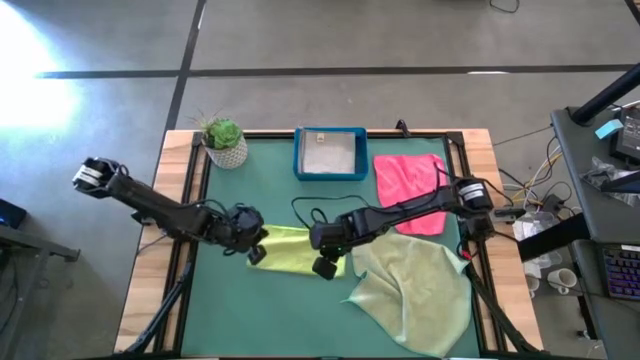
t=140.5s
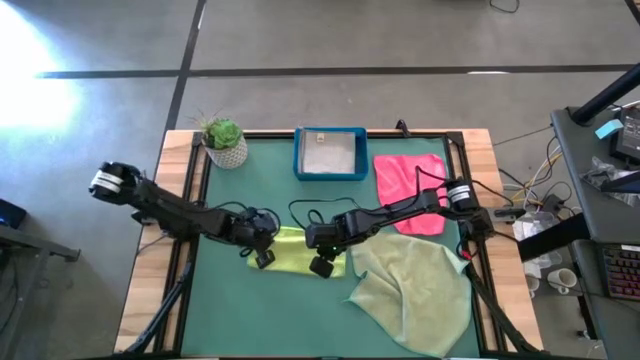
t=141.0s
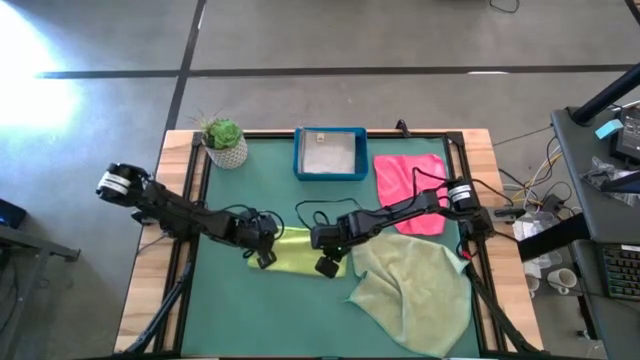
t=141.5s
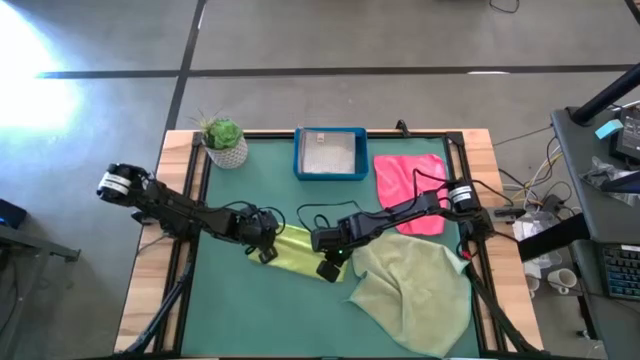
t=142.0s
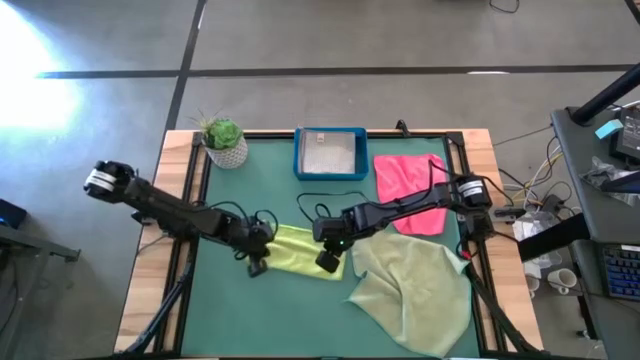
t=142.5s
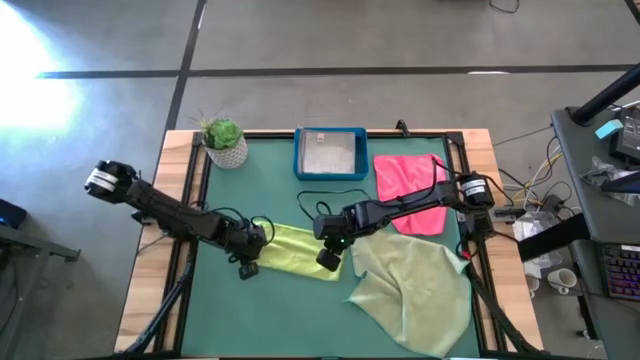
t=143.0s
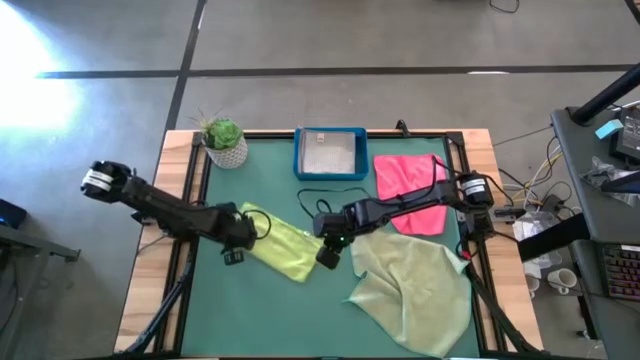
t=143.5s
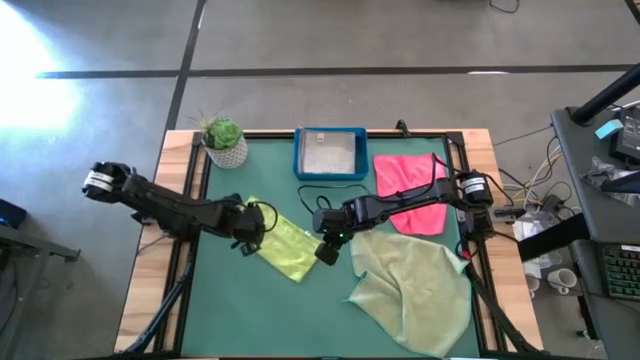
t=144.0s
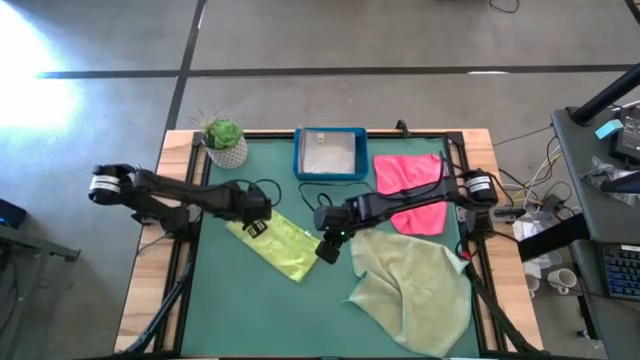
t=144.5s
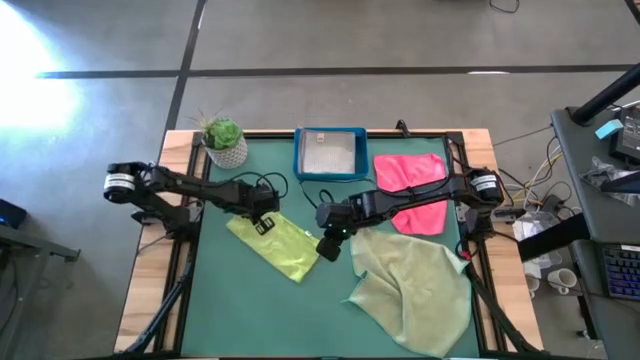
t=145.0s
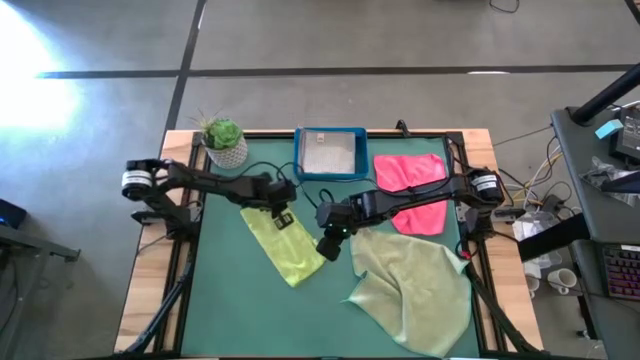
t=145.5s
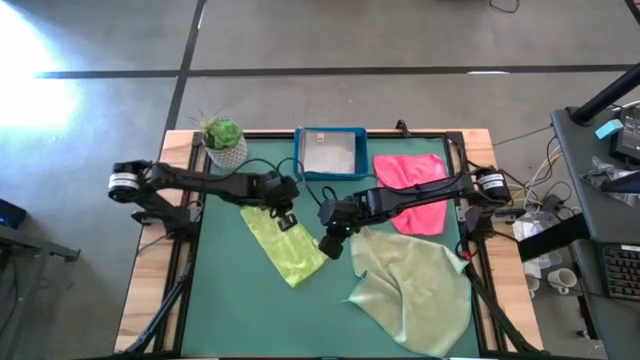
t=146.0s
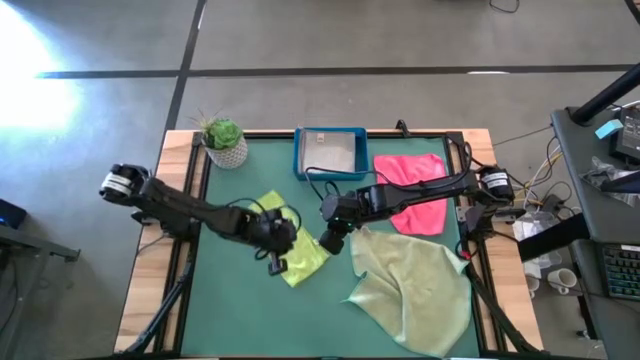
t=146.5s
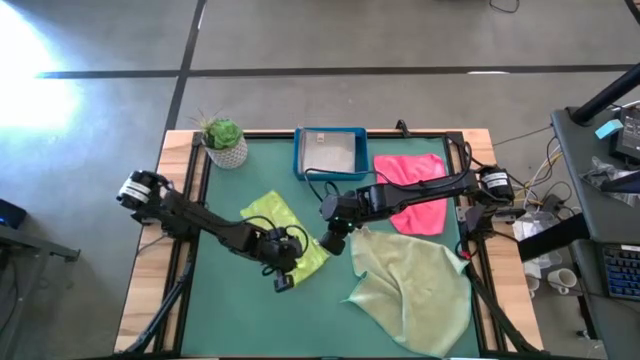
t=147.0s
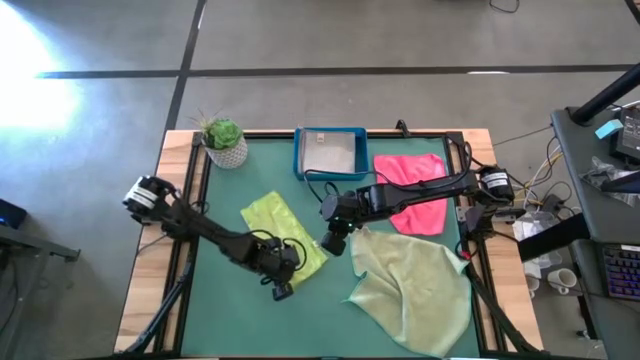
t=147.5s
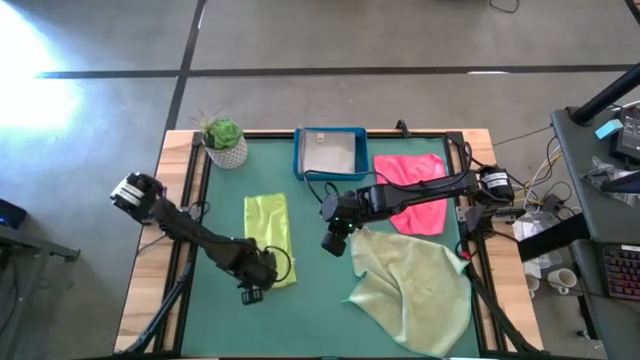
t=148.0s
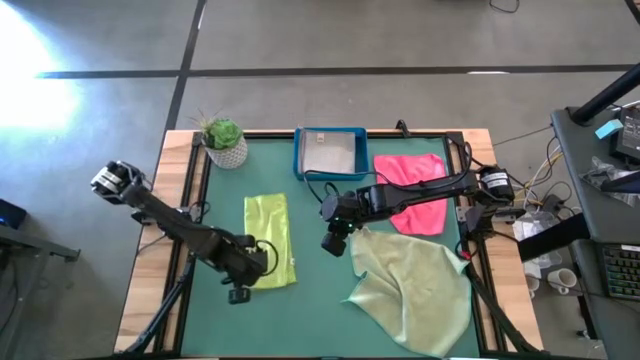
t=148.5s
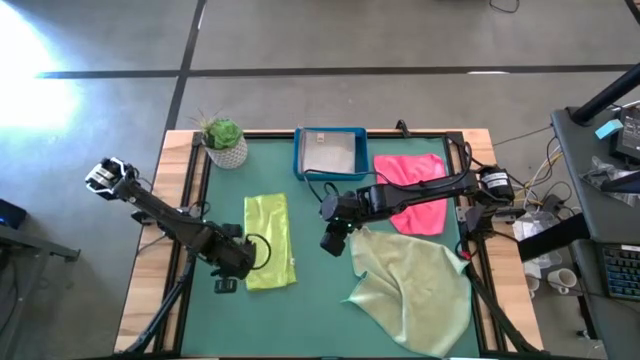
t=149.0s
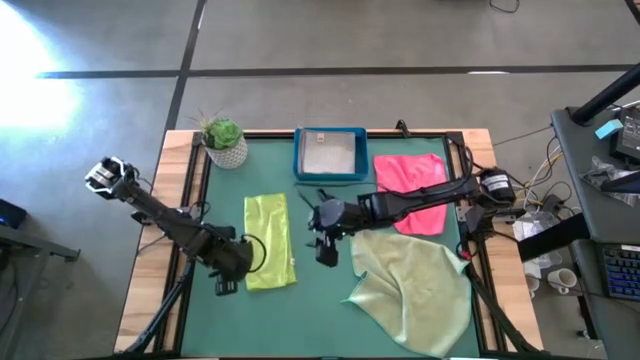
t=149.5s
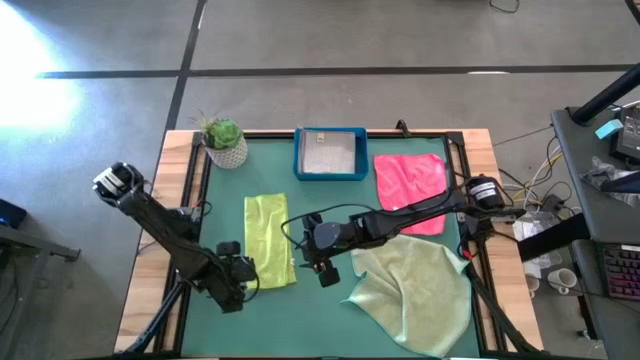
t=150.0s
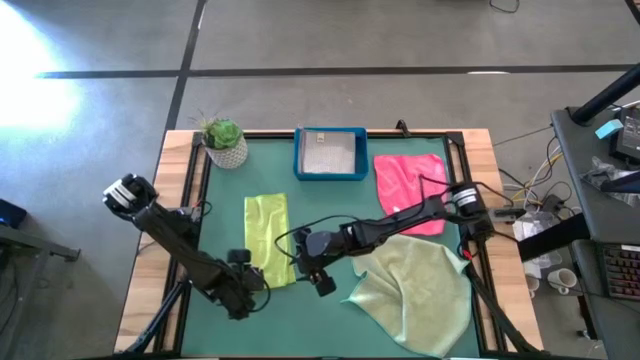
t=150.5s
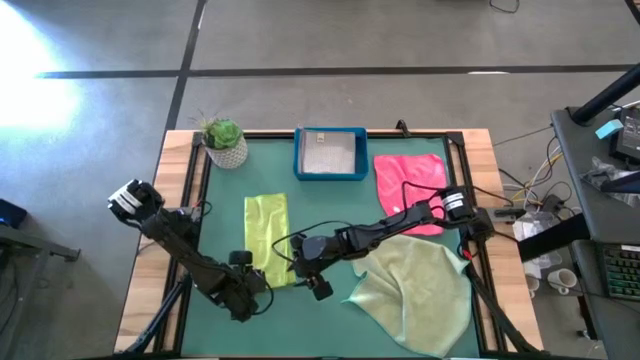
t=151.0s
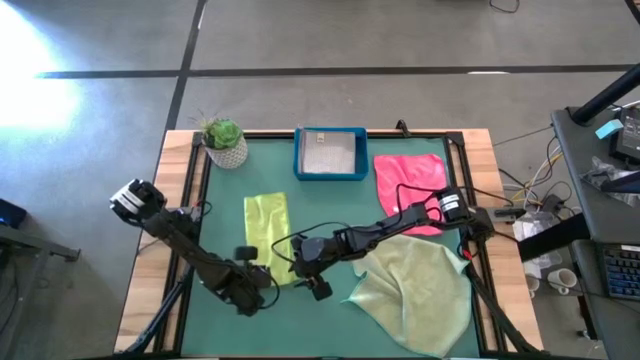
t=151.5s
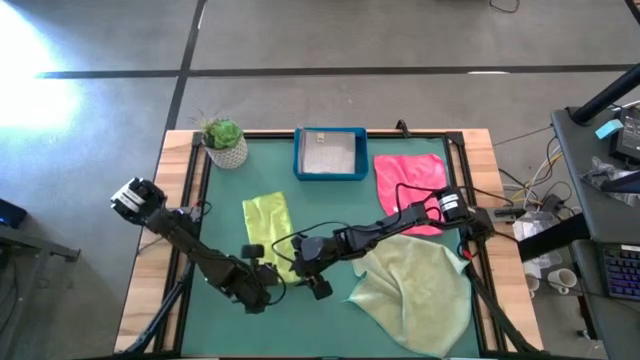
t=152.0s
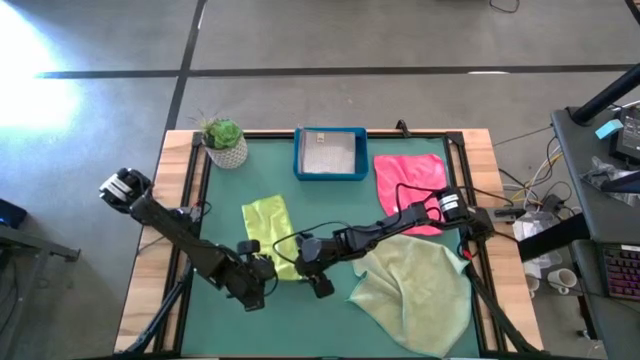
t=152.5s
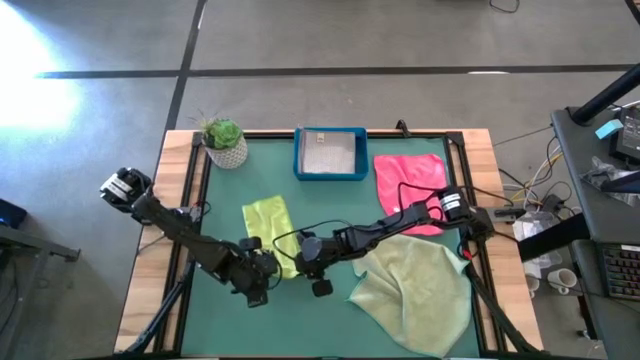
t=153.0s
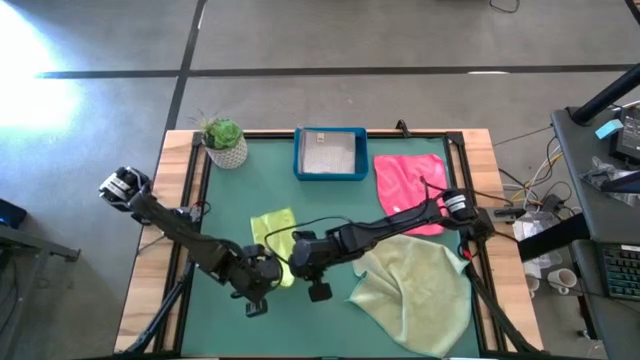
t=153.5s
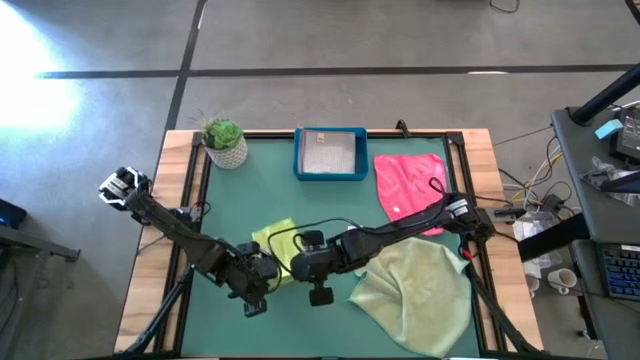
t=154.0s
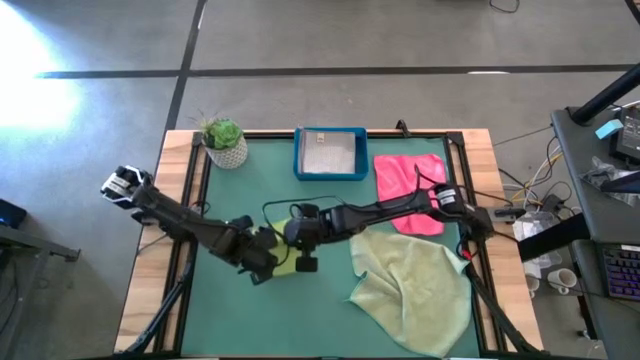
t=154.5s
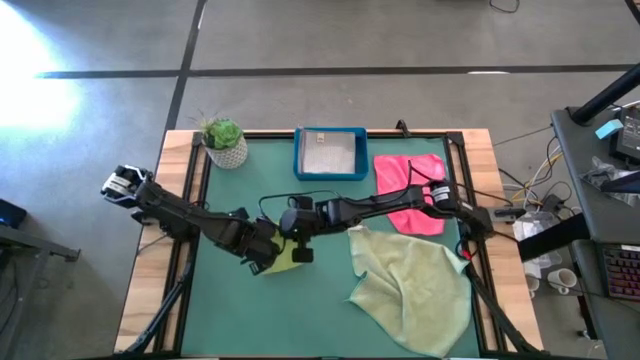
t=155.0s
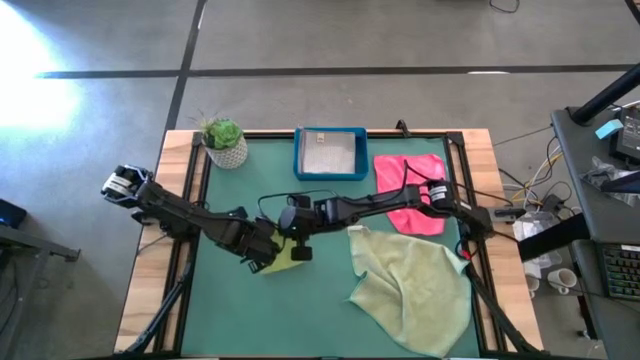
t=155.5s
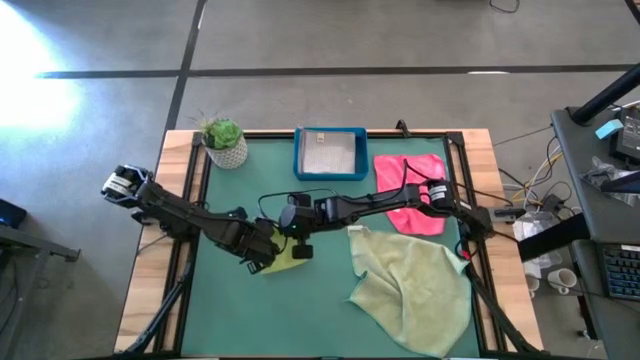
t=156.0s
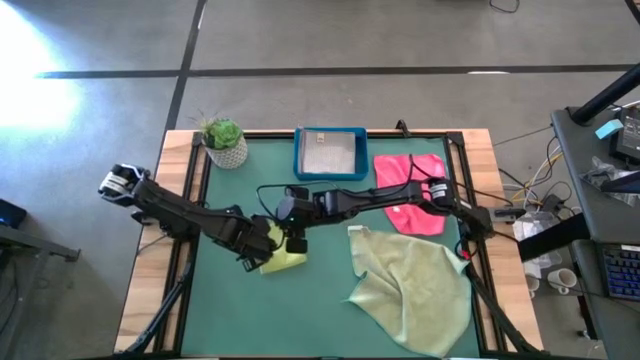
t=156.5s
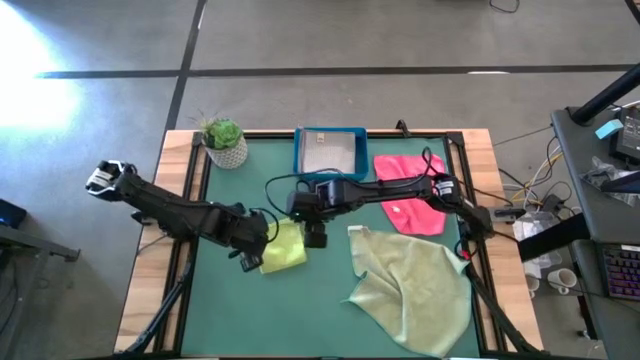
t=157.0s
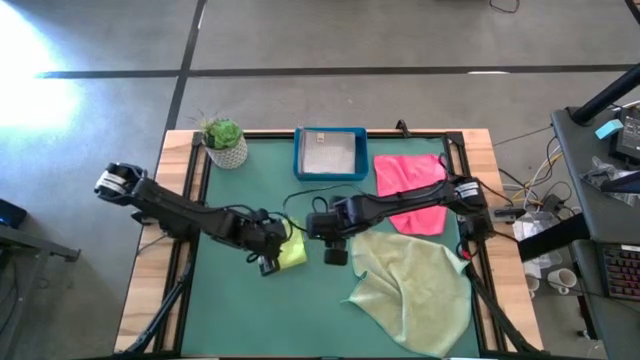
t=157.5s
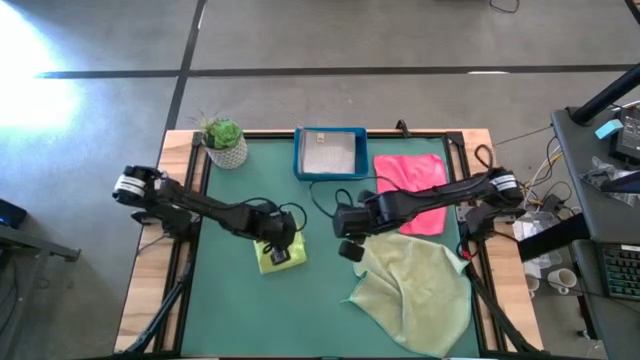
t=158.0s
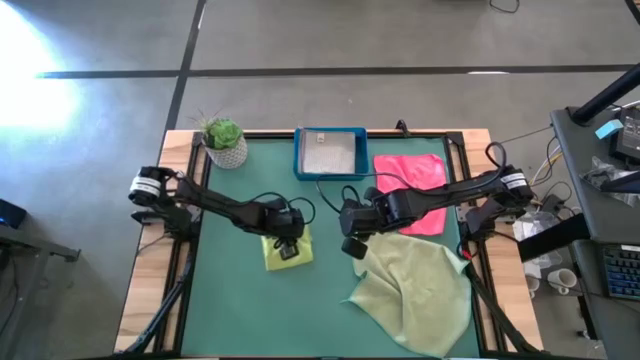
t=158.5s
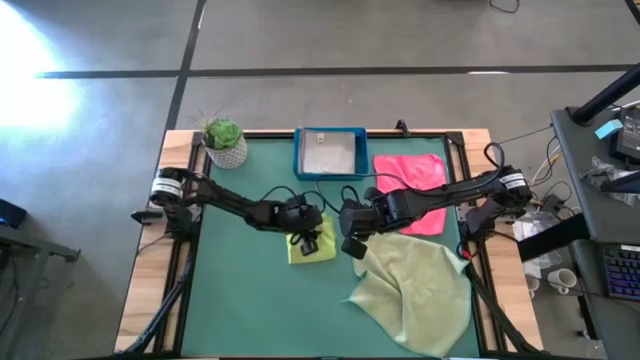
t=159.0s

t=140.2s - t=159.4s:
Task: Fold microfiber towels
Fold the green microfiber cloth

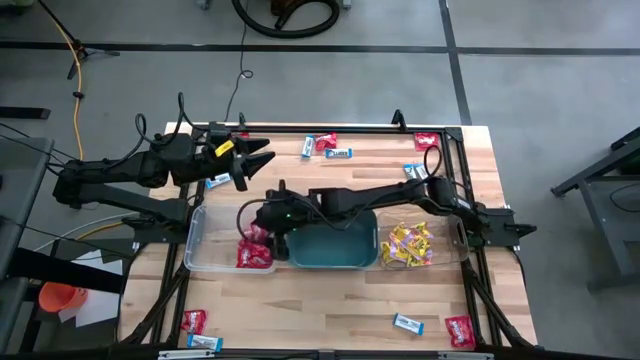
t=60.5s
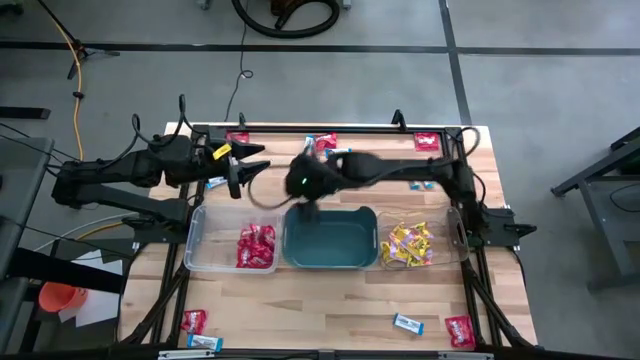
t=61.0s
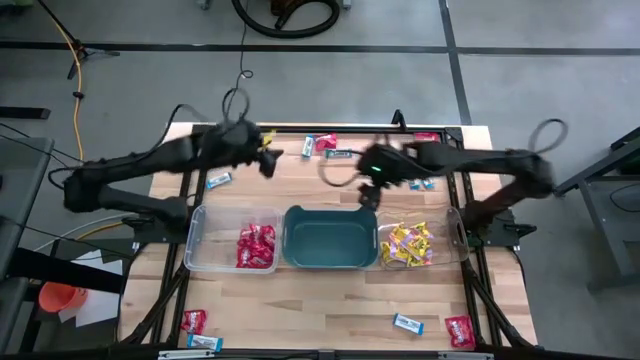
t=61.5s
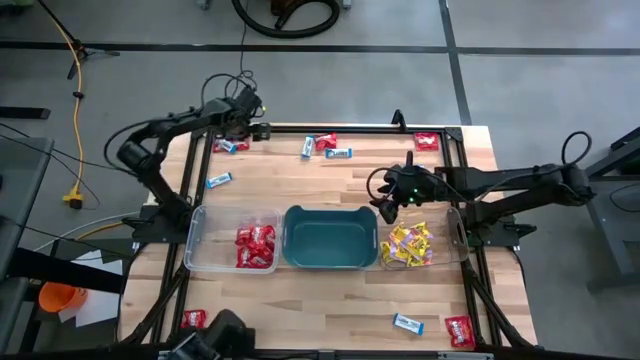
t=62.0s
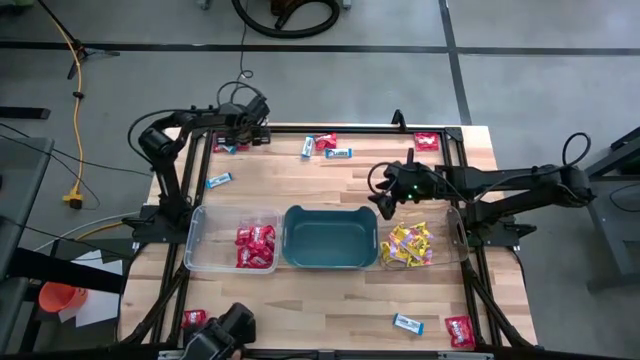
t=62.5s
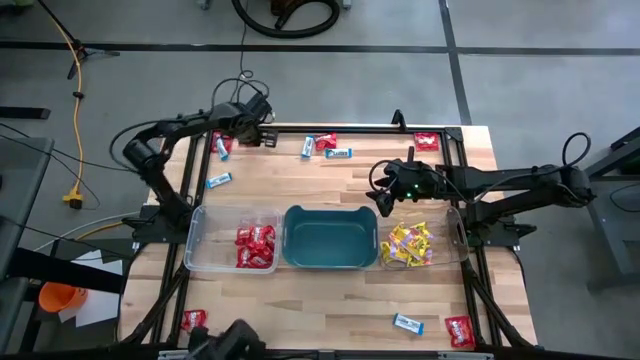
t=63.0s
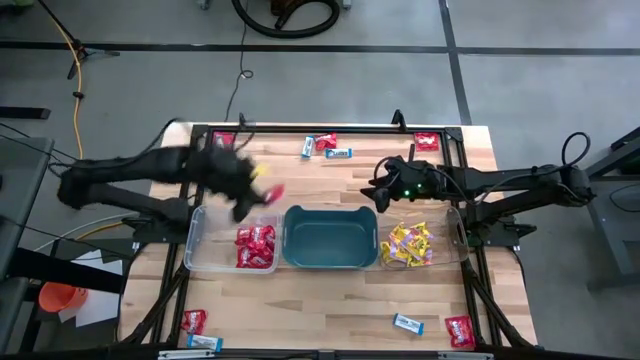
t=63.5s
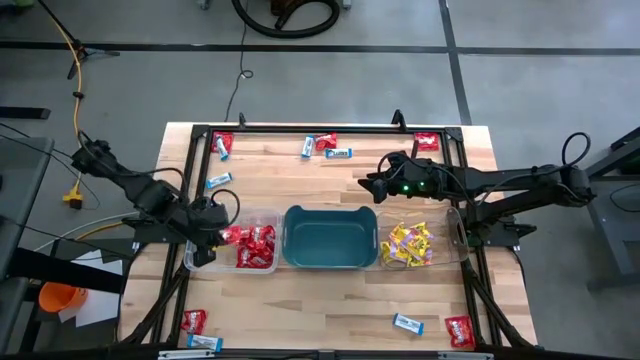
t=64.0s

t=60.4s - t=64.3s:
Task: Sort candy
Put the red candy into the left transparent bin
